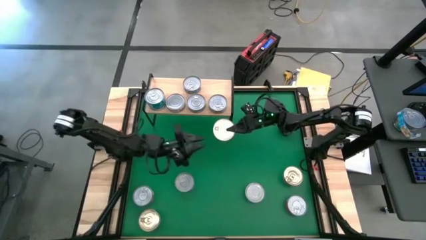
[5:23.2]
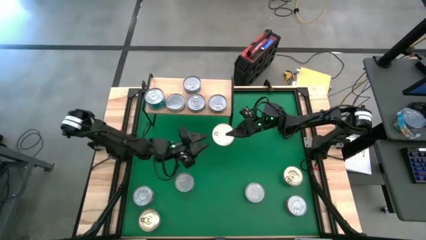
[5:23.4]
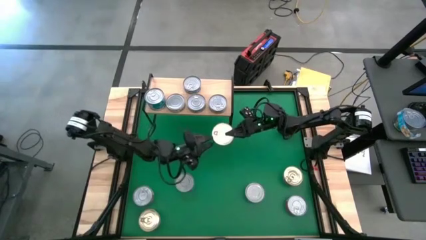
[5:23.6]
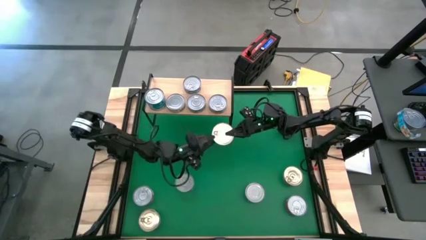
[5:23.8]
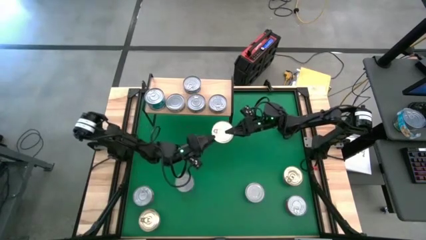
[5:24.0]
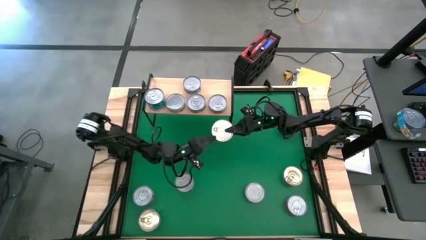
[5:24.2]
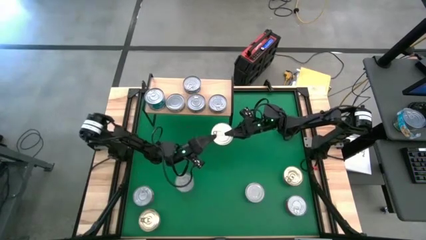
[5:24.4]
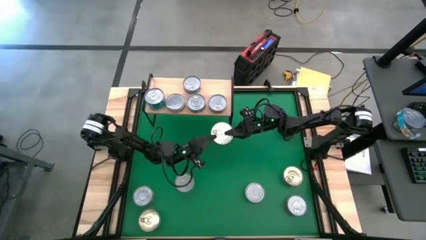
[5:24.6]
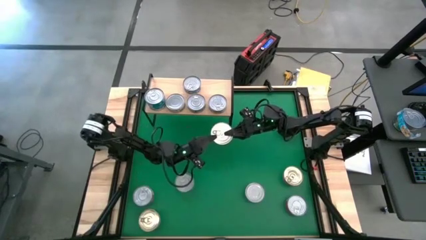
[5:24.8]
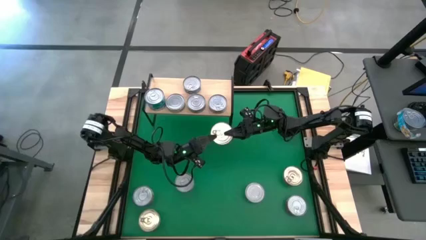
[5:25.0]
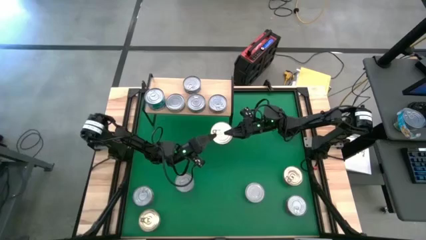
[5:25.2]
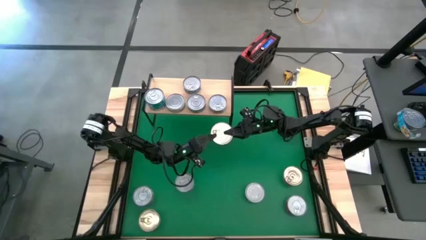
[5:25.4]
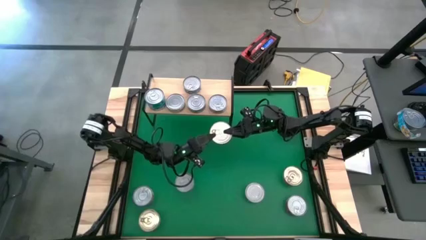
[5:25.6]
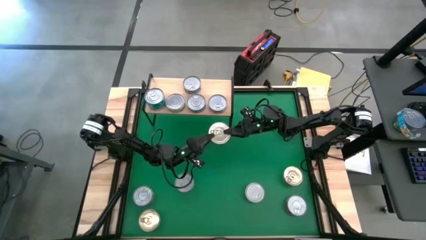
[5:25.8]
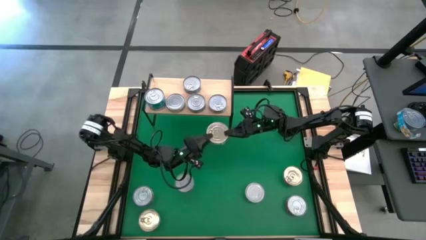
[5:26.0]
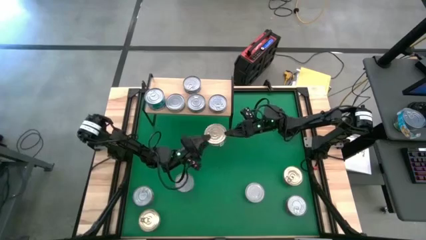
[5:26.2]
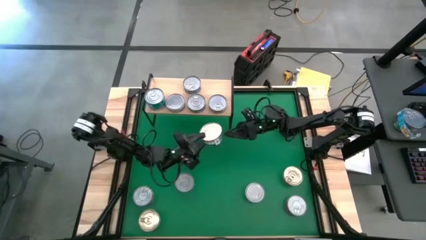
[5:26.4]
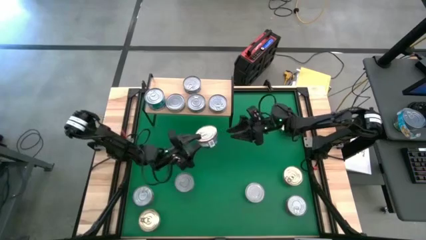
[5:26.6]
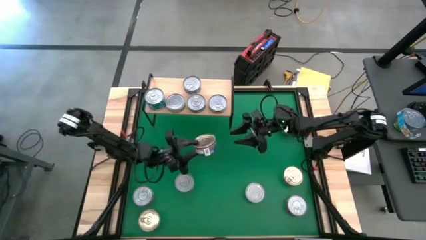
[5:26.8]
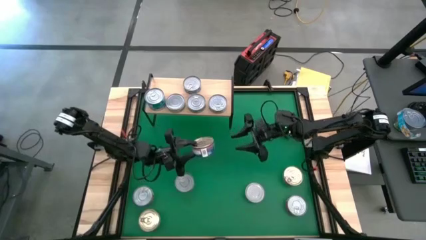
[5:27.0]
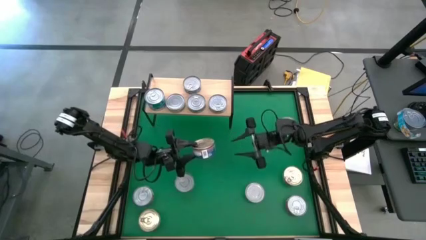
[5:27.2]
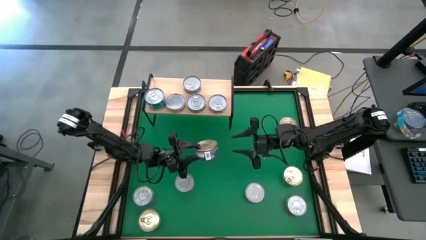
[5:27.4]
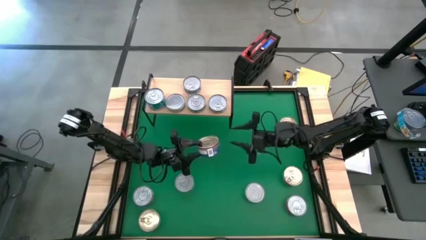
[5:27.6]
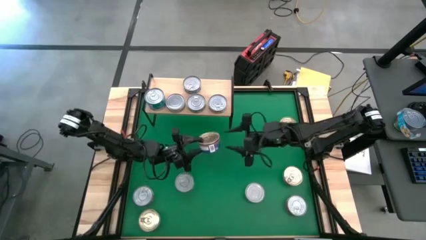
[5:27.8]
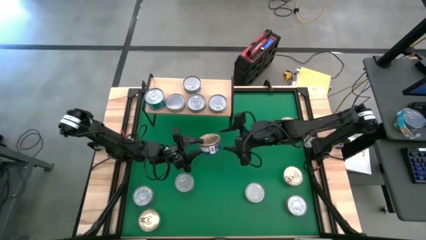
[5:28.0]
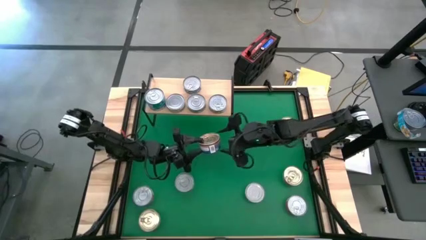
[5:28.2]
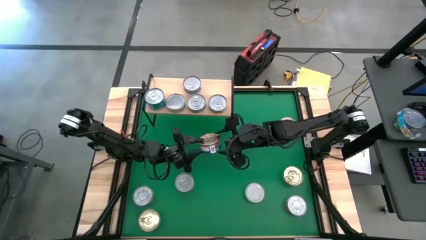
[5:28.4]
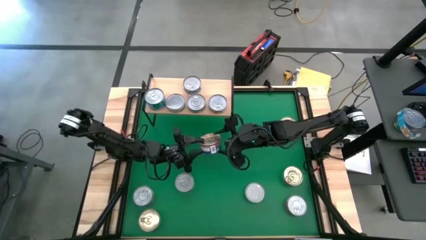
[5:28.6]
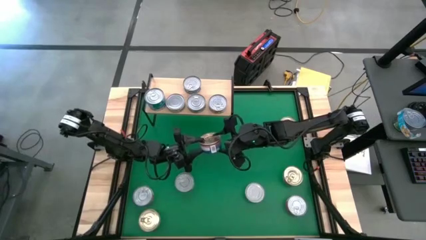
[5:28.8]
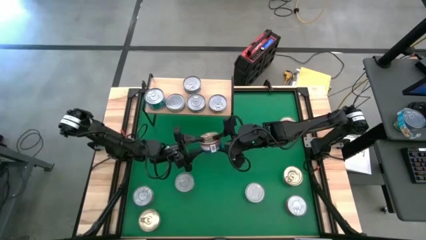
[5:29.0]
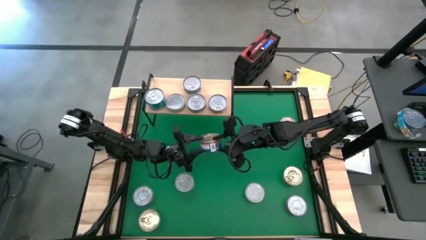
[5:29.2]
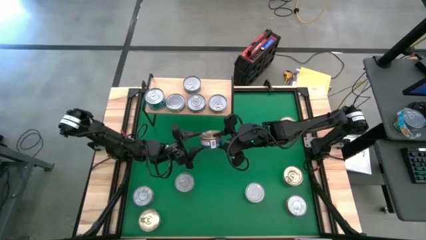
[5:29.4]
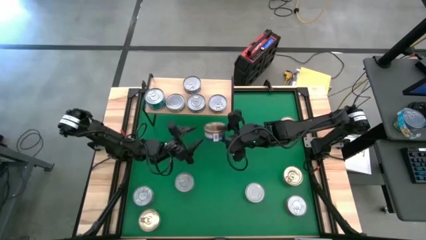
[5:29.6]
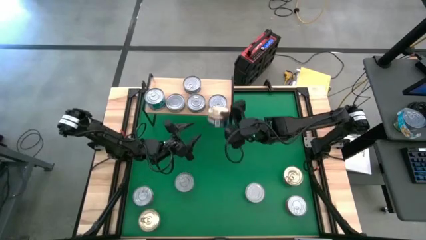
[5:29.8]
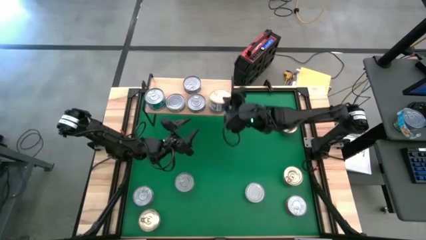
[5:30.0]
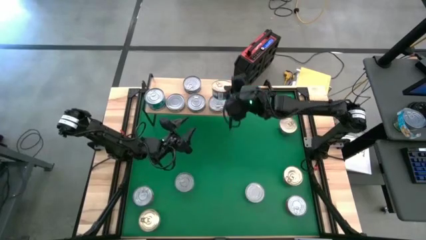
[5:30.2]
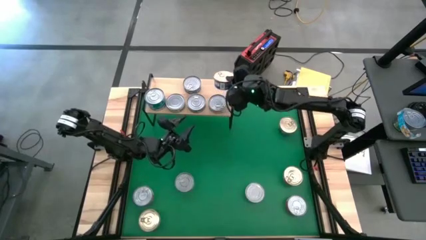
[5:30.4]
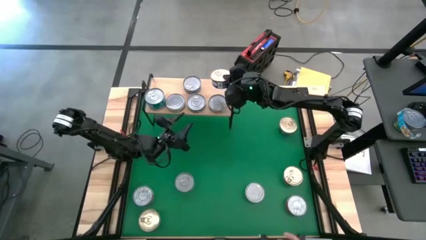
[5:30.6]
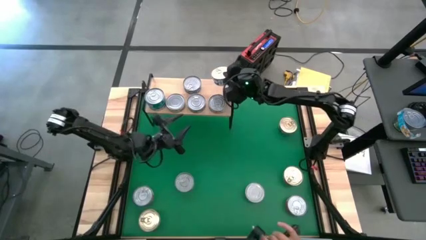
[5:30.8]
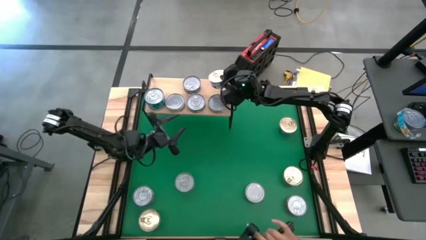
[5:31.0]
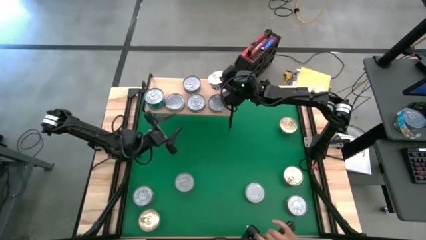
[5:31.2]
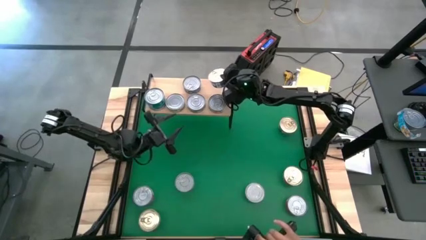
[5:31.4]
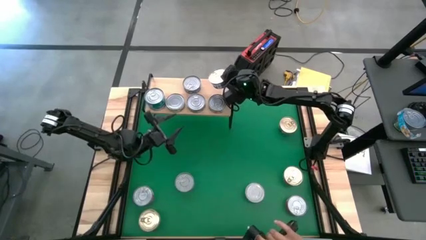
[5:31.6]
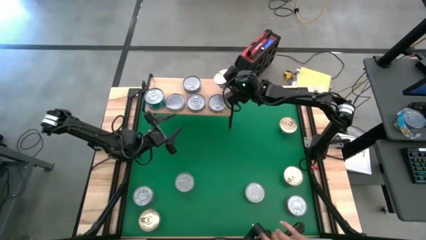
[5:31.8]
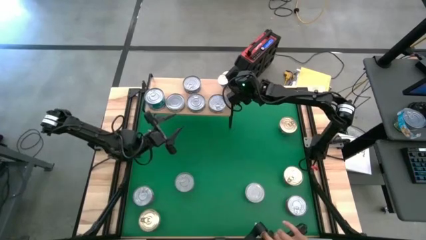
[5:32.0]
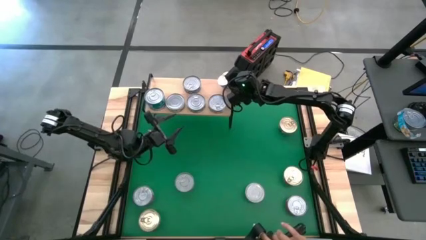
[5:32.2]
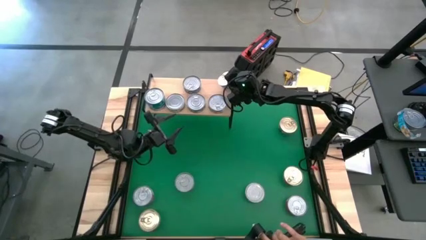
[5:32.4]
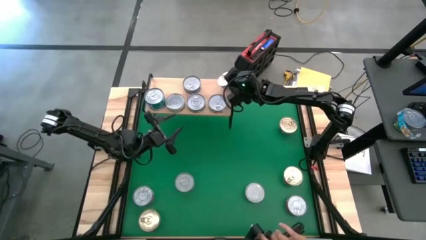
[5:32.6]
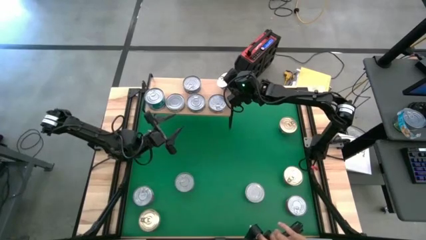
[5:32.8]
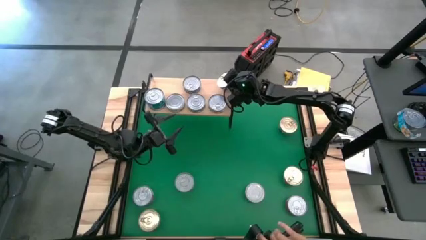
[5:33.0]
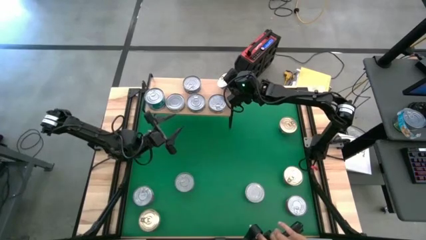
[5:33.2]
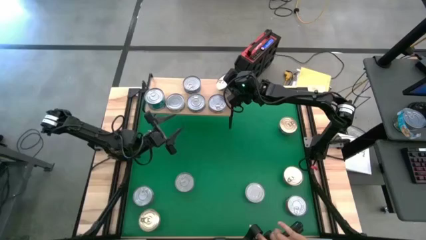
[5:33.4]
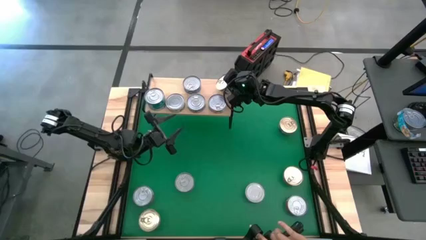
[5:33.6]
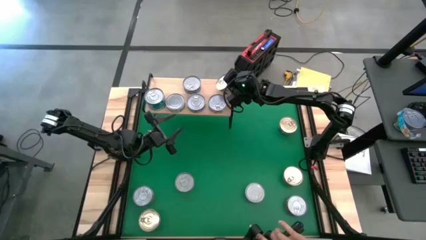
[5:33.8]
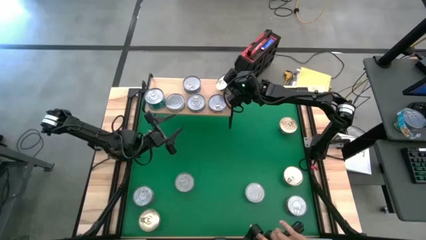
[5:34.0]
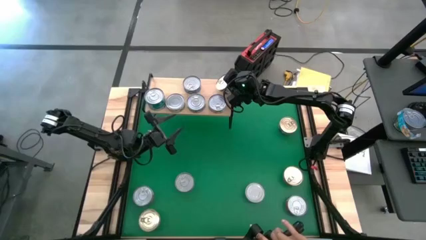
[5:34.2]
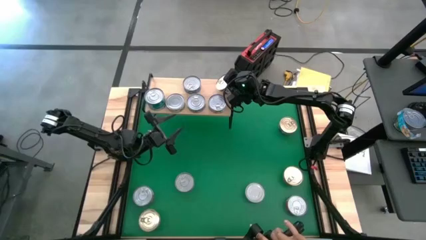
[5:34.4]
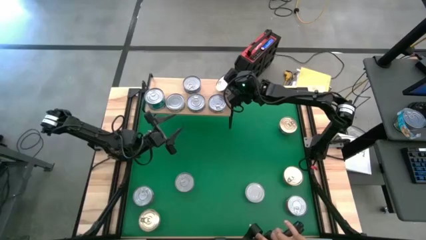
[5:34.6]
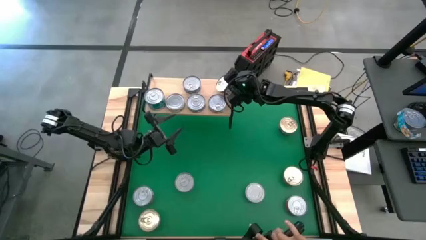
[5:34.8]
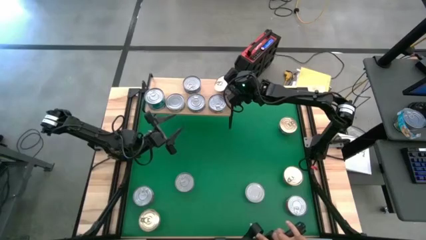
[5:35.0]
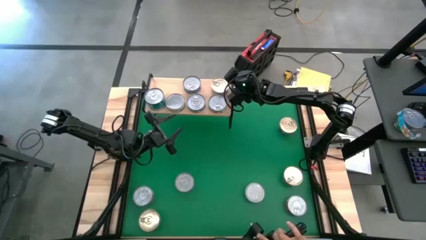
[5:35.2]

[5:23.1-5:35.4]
Task: Stack canned seafood by type on shelf
Put the top right blue tuna can on the shelf
